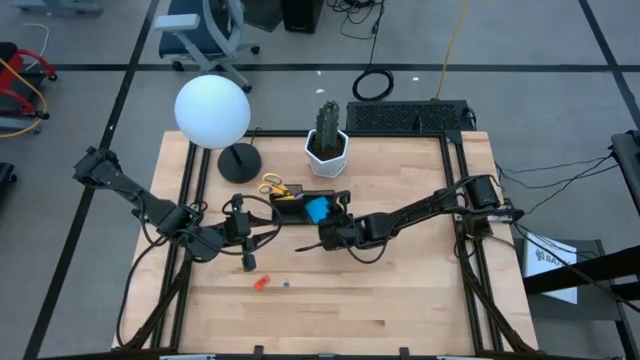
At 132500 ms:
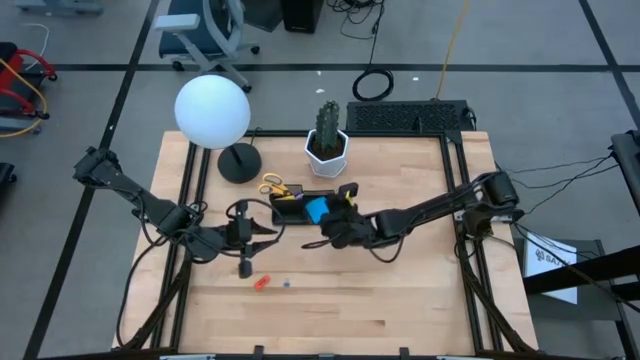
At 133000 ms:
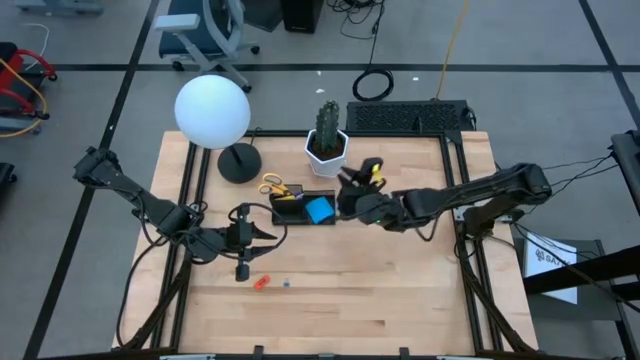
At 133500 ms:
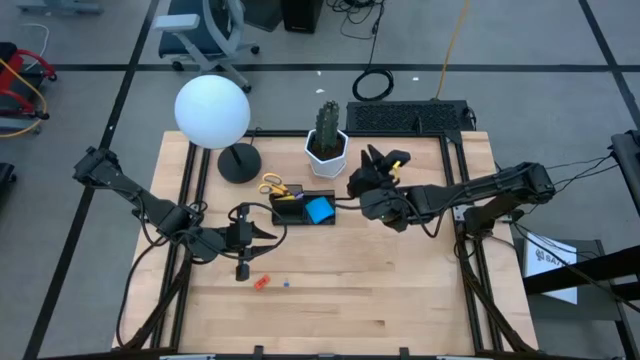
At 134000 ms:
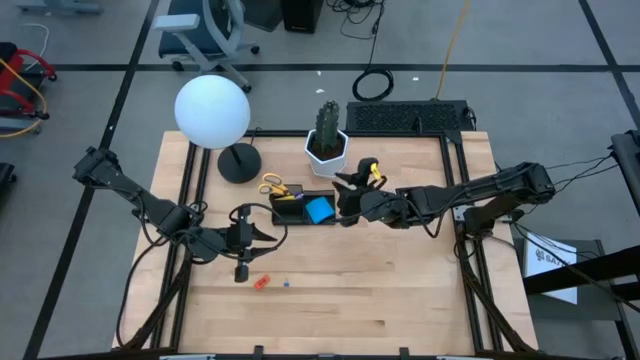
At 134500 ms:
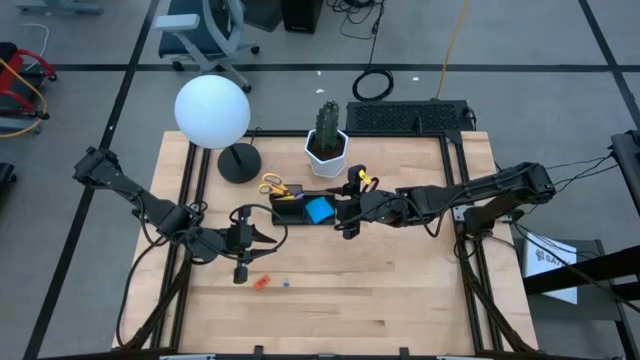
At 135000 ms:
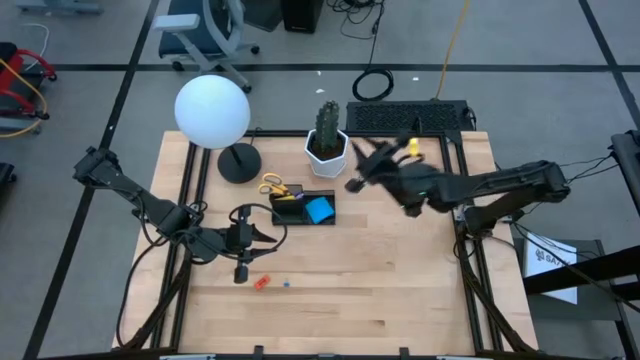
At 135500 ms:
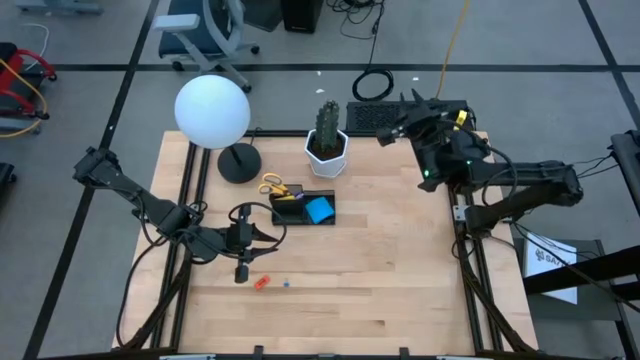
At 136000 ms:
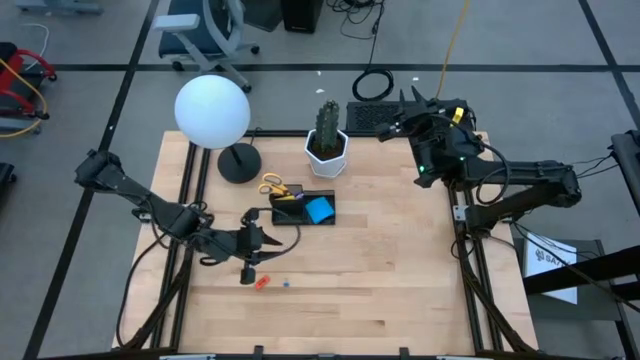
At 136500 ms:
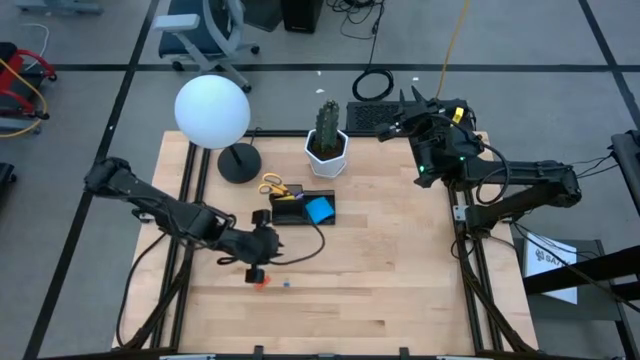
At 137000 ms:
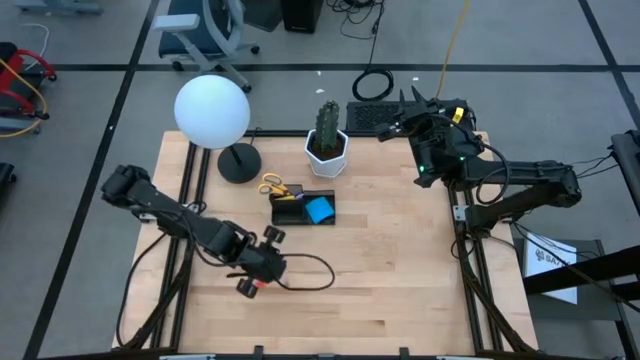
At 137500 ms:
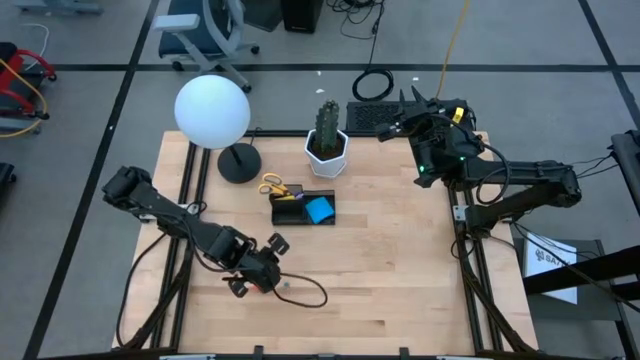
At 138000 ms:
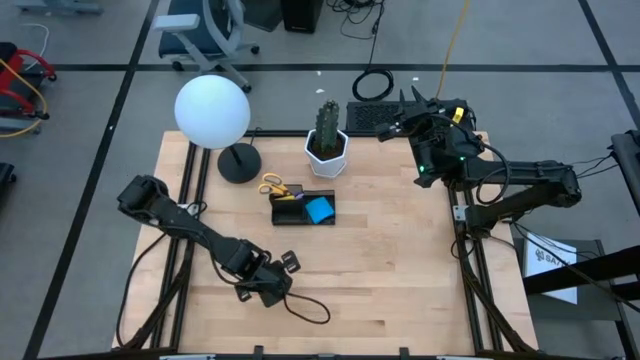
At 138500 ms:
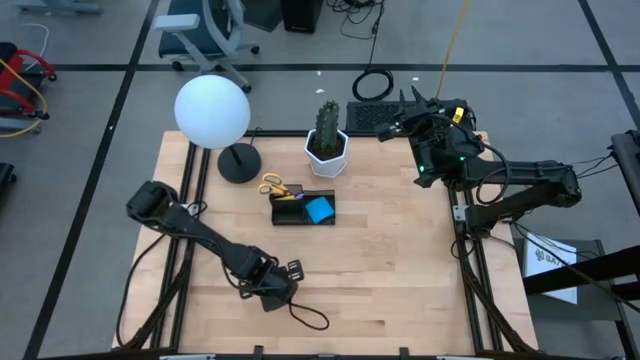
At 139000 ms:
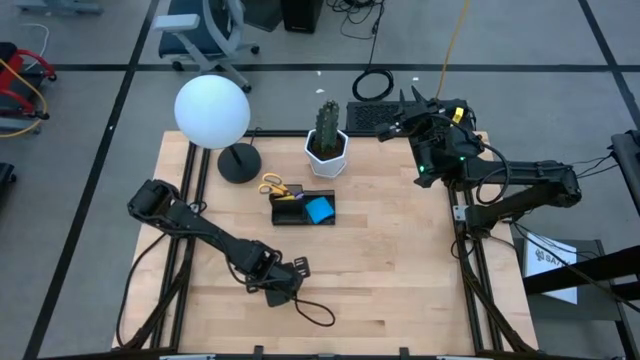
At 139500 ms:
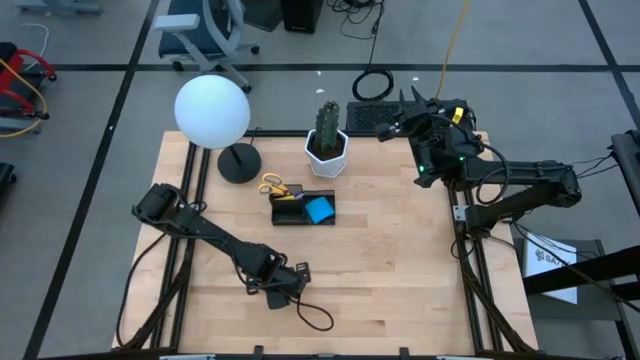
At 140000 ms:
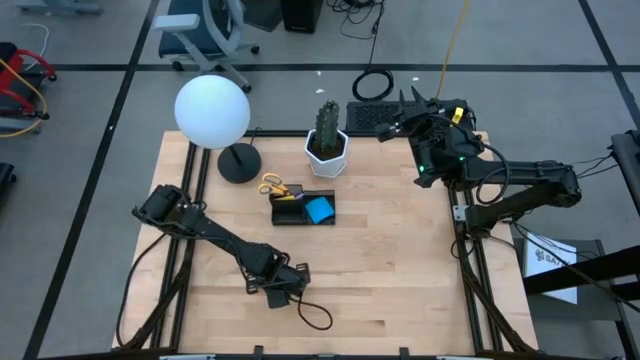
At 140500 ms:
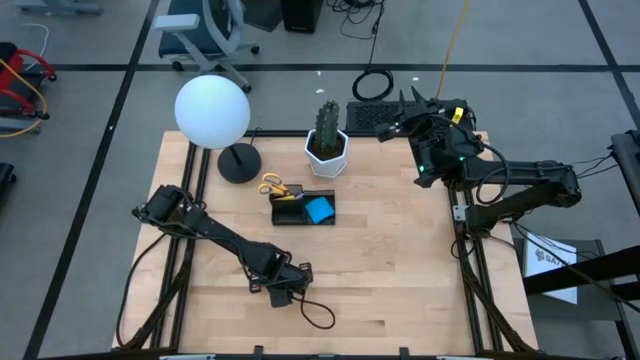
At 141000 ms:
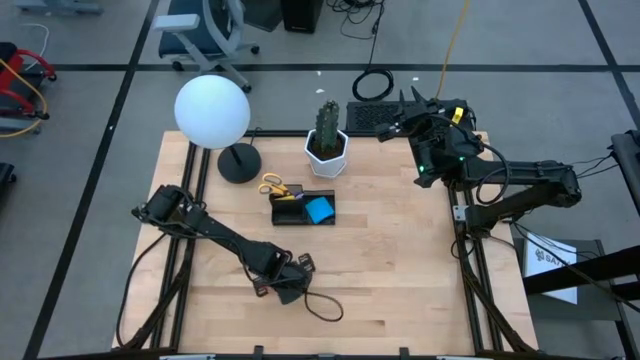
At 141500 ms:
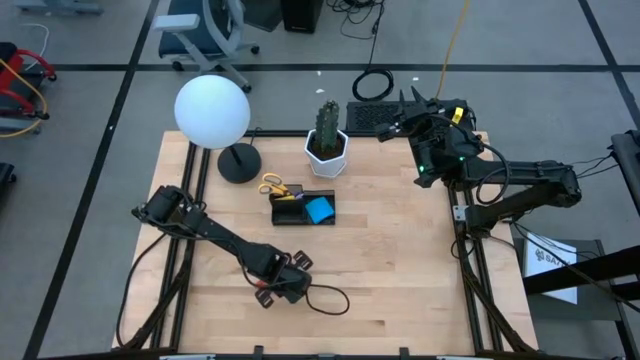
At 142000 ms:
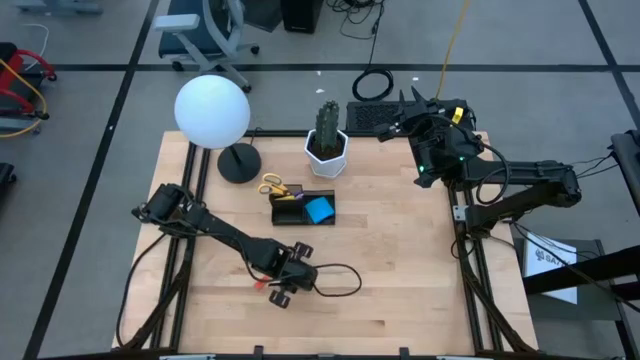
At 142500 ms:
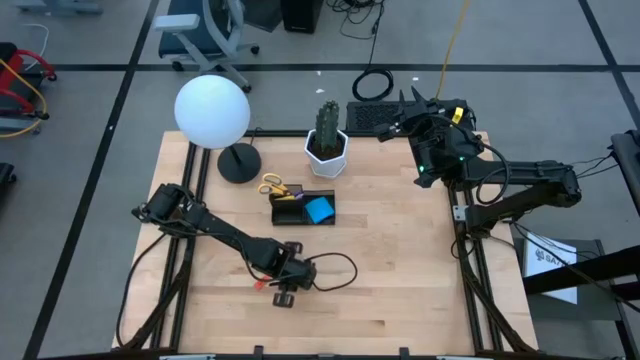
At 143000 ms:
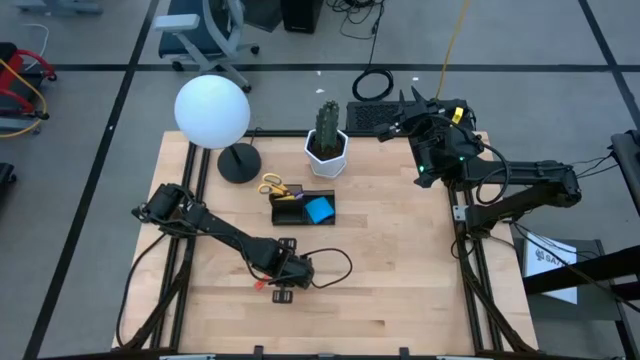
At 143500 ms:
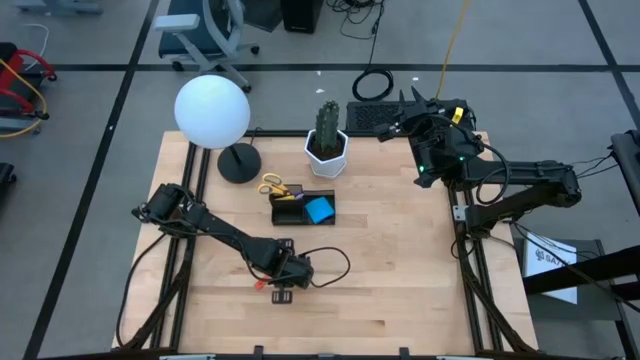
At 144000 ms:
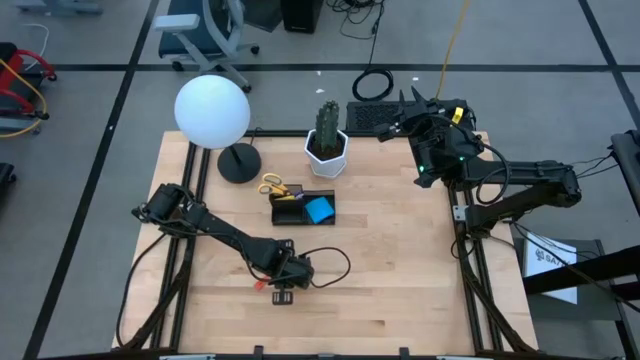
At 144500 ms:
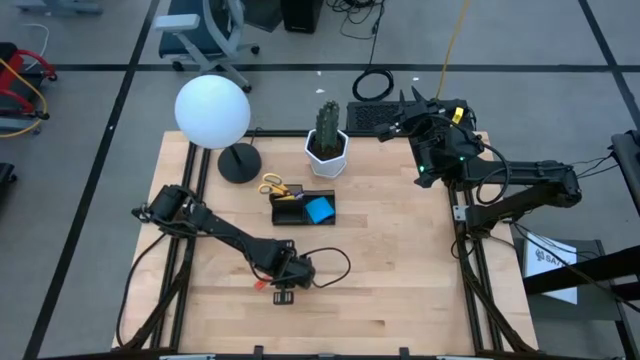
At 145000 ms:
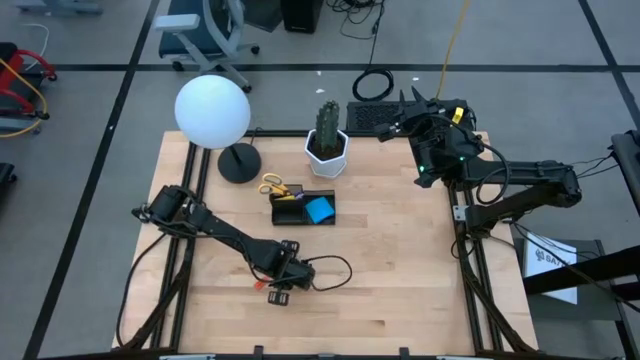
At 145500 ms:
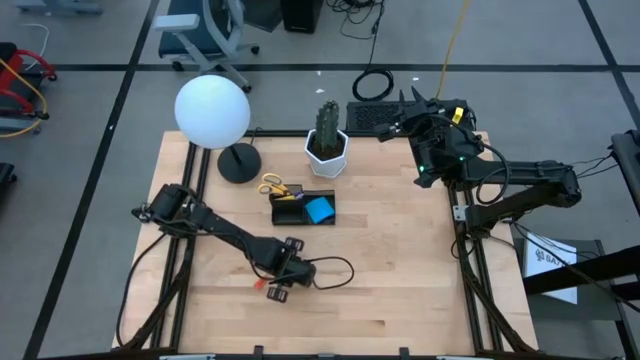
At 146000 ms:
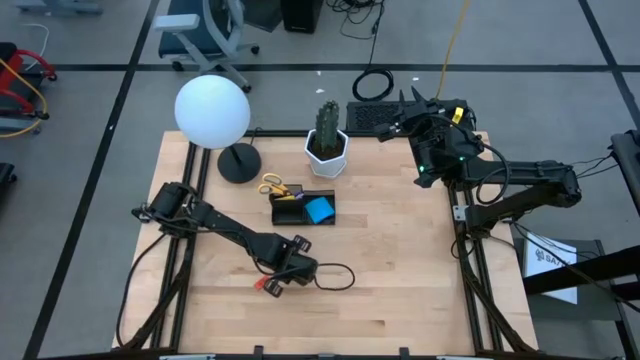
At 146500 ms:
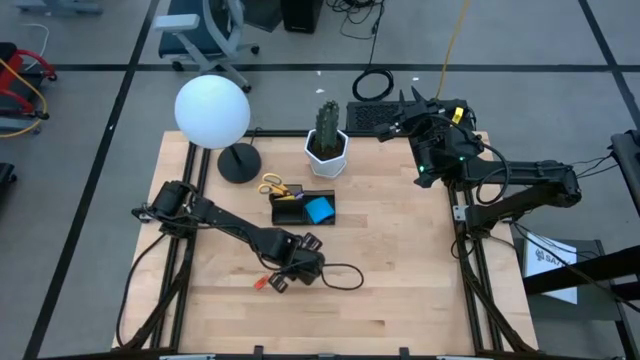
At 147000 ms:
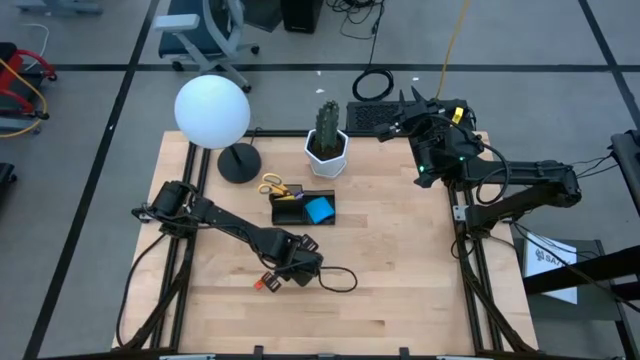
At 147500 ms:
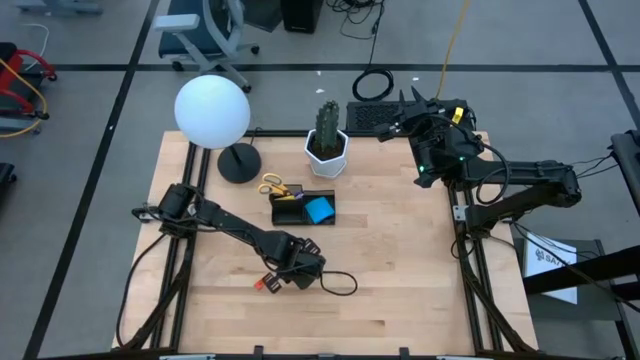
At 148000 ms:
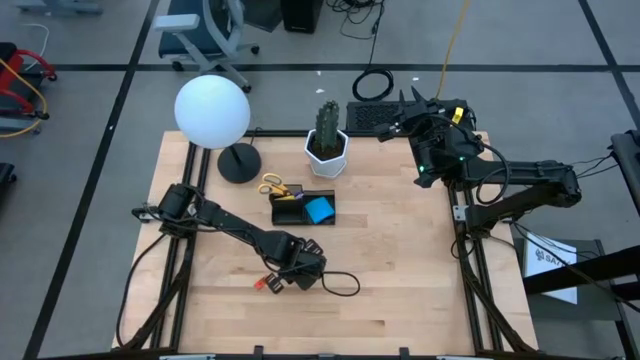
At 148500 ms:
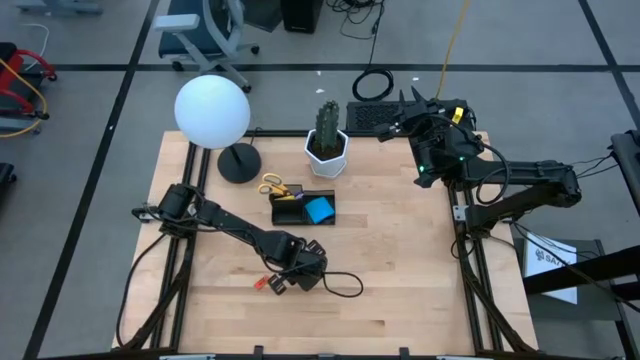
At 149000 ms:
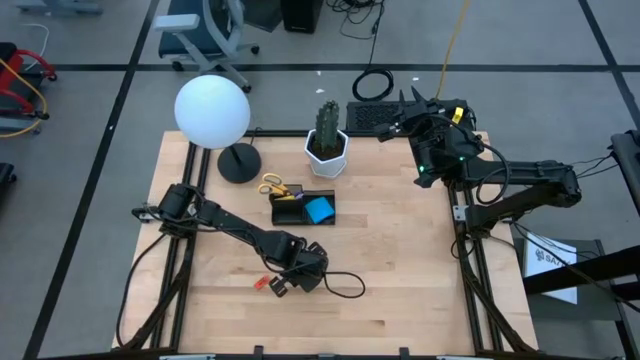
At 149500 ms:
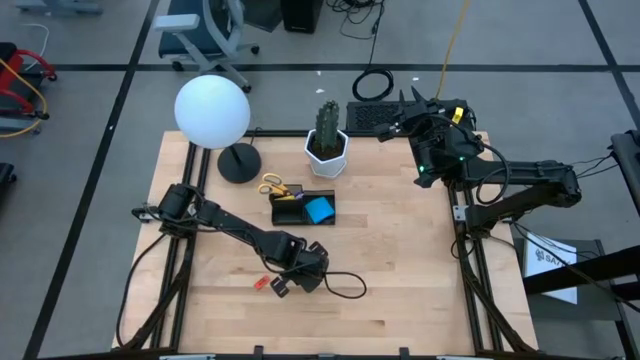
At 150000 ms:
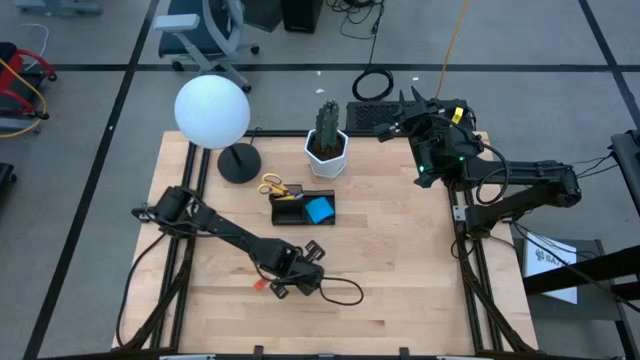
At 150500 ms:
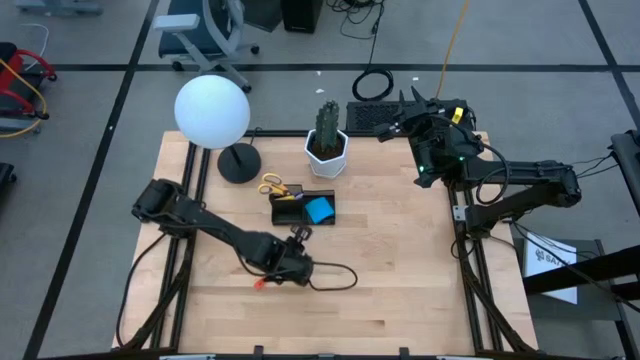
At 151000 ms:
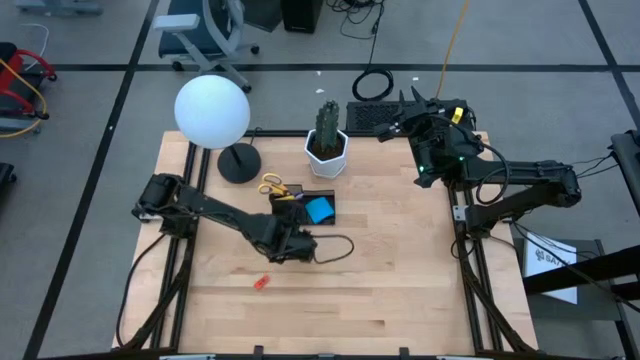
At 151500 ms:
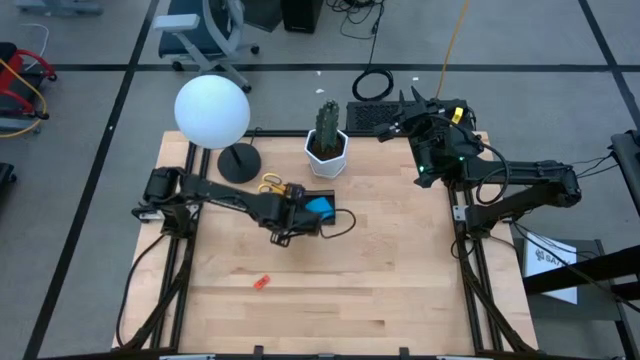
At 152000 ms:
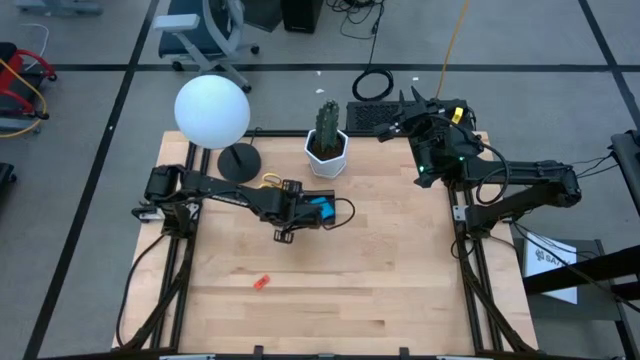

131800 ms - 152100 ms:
Task: Pick and place office supplies into organizer
Put the clip binder into the desk organizer
